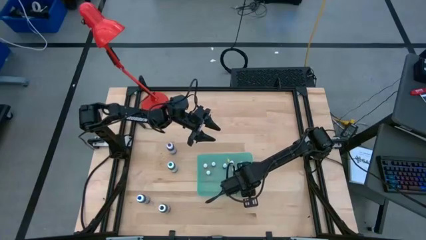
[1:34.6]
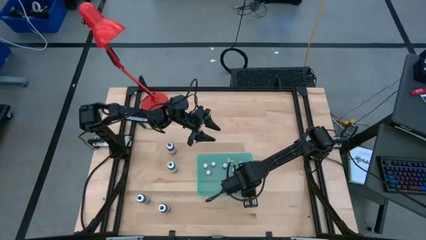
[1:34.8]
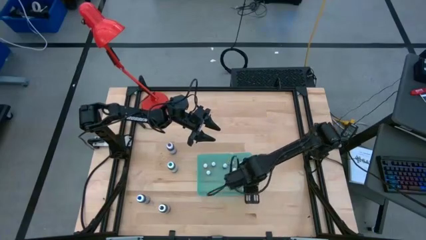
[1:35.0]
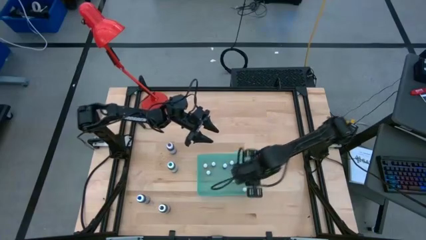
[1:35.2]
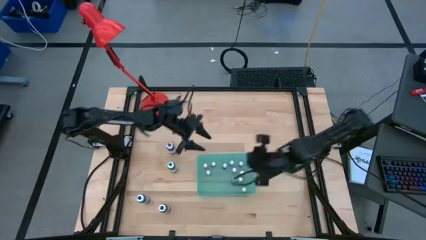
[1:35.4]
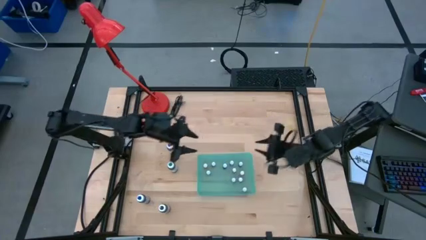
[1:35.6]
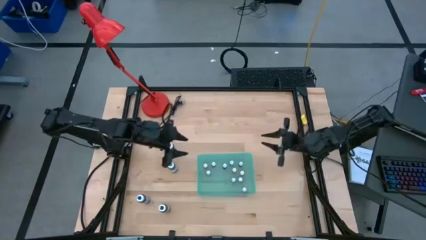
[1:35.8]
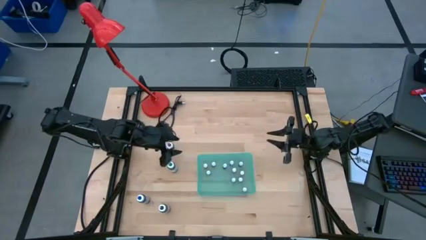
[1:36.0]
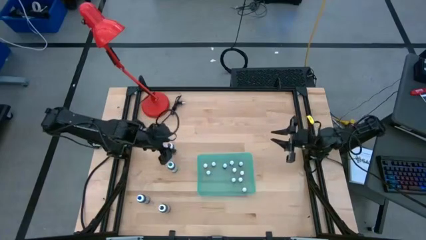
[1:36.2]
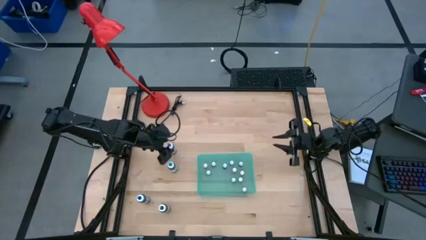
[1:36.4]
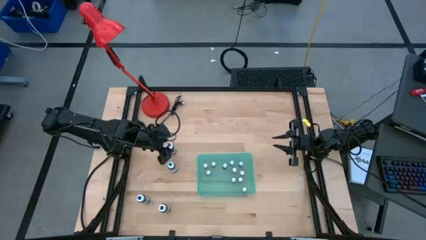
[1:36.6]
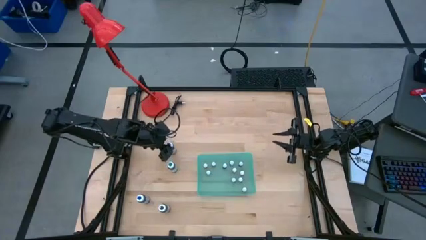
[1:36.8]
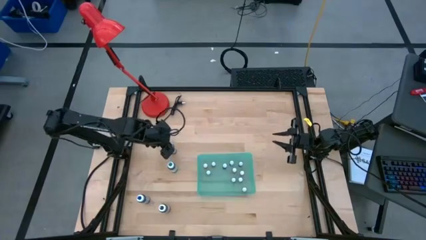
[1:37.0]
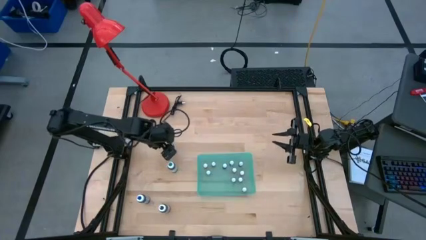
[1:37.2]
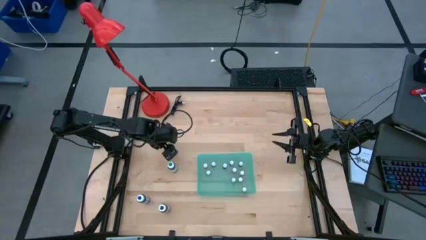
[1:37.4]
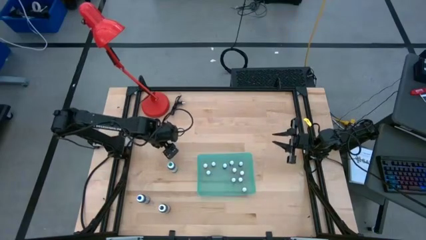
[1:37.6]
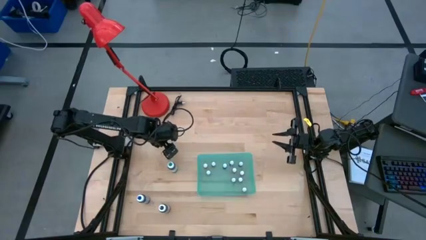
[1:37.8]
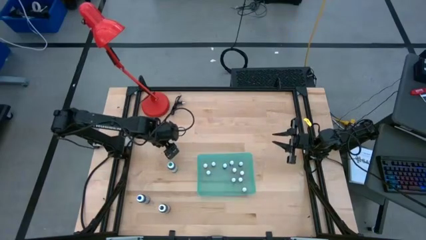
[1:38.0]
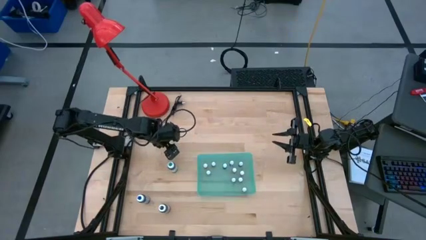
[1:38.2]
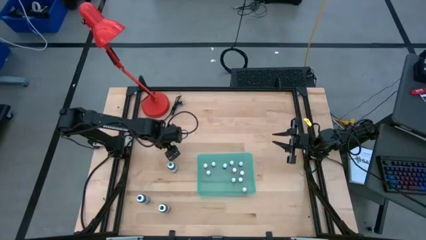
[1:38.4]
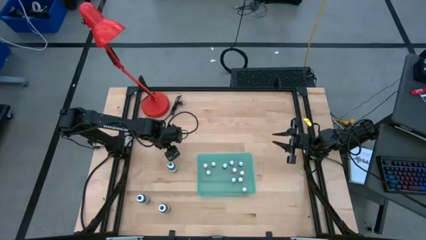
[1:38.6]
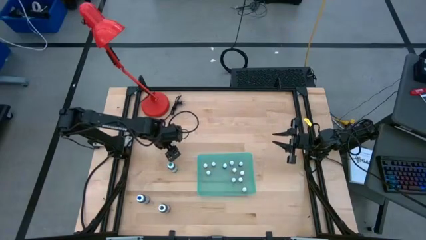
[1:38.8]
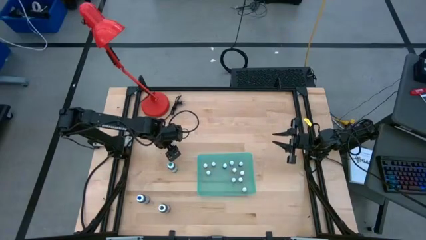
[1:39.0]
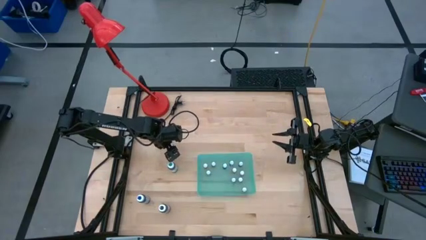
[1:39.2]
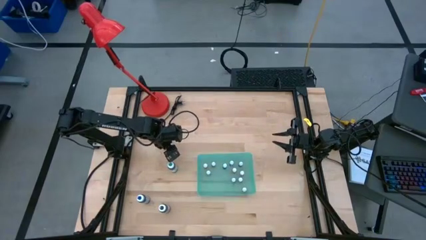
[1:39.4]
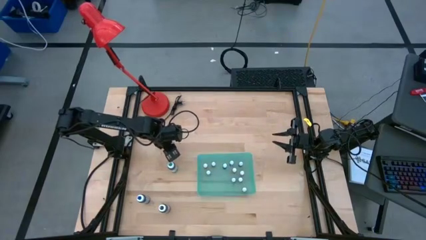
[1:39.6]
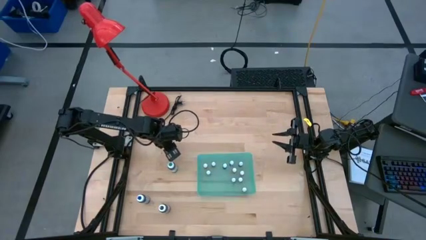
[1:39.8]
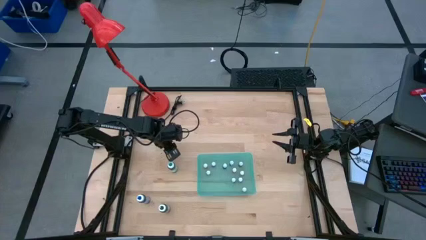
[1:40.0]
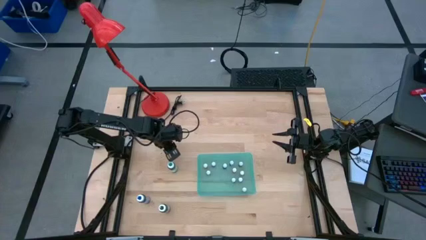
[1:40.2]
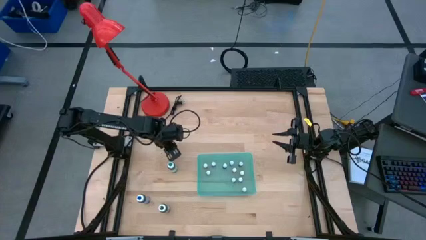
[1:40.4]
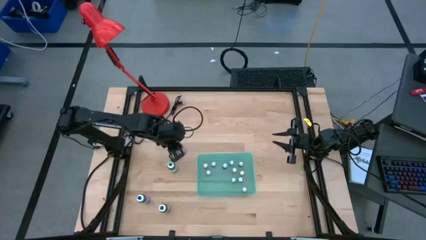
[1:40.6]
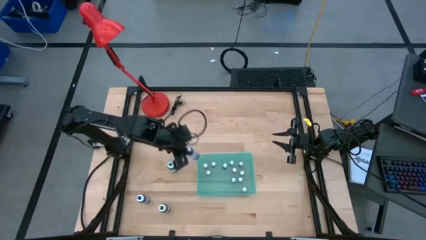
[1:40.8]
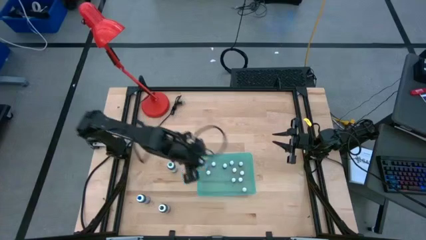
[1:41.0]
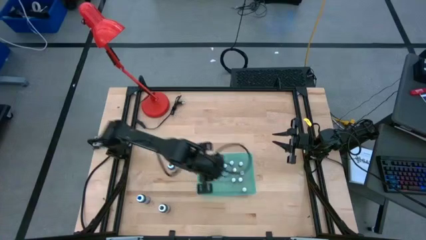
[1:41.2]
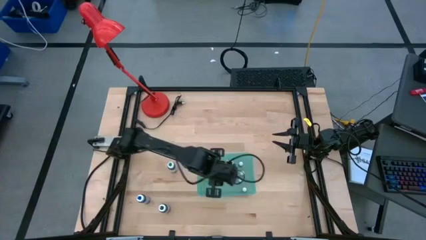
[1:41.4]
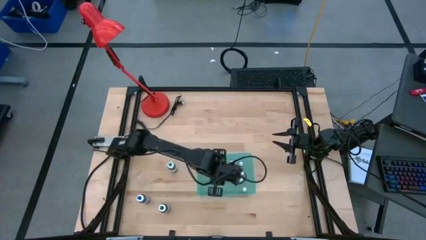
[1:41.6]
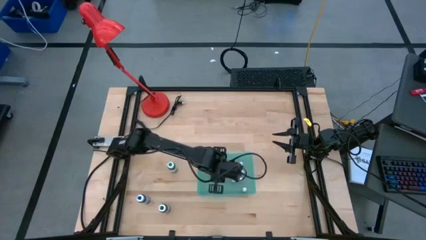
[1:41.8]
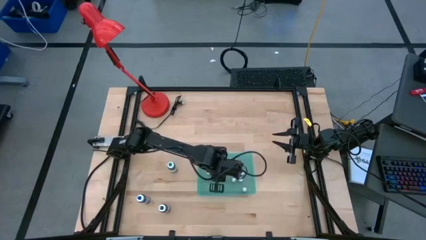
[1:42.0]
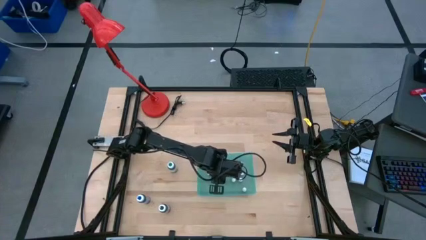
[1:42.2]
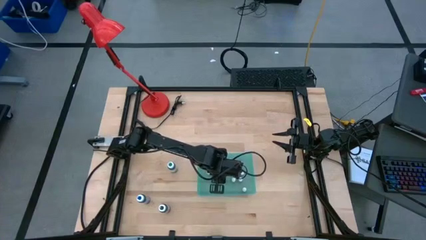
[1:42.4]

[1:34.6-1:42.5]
Task: Pick & Place food coloring
Put the large purple food coloring bottle into the green bin

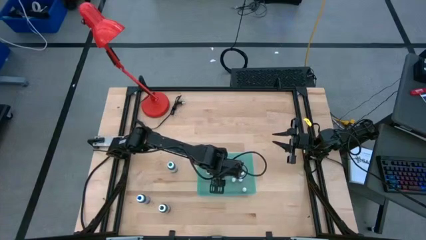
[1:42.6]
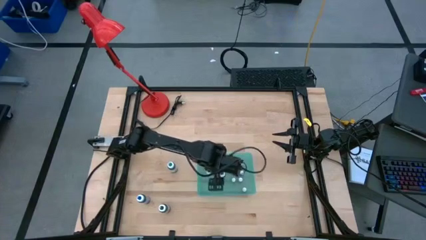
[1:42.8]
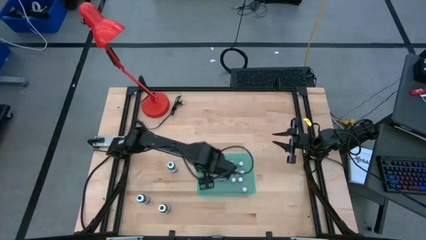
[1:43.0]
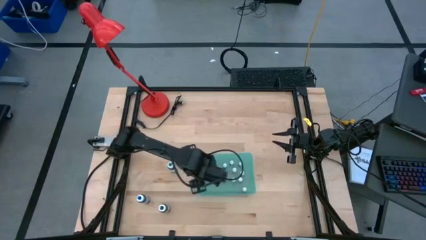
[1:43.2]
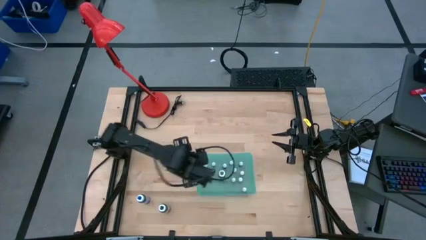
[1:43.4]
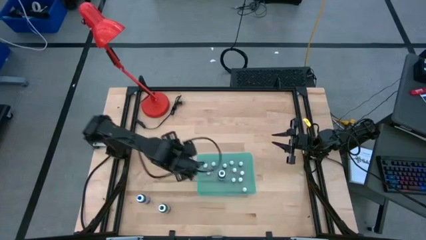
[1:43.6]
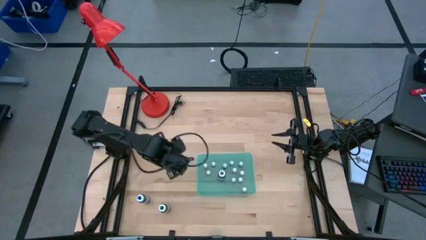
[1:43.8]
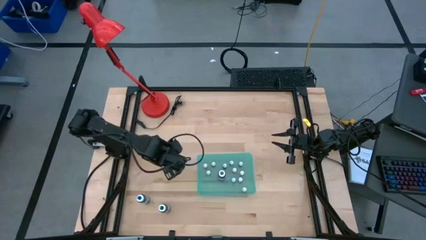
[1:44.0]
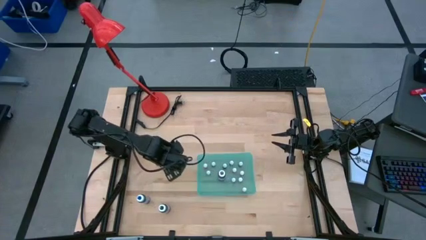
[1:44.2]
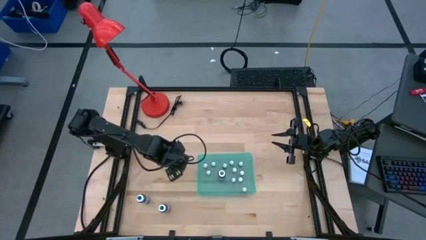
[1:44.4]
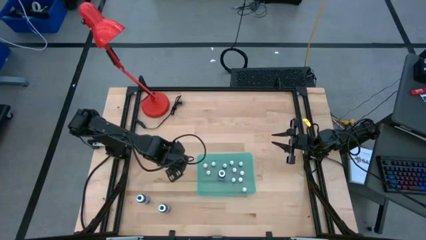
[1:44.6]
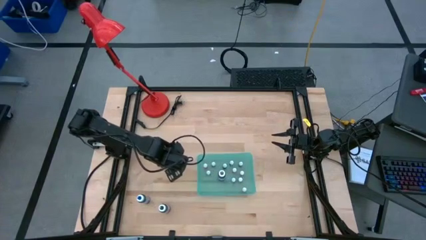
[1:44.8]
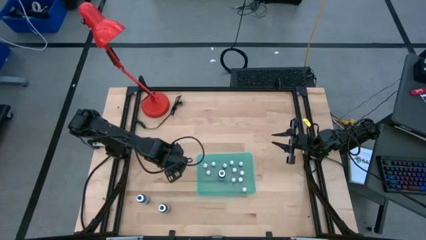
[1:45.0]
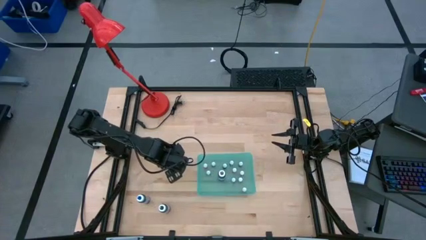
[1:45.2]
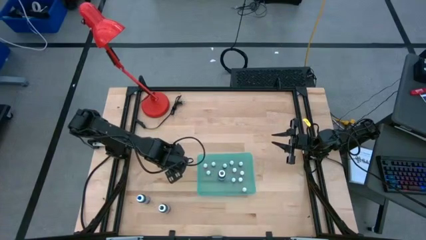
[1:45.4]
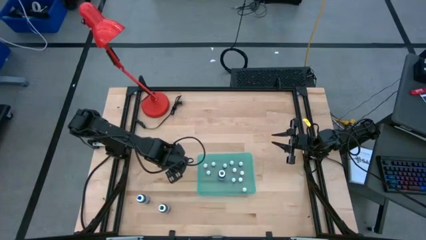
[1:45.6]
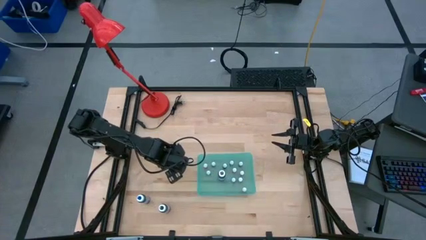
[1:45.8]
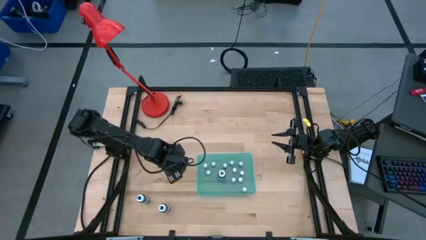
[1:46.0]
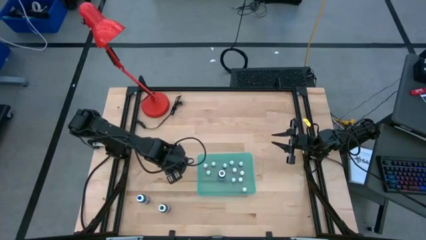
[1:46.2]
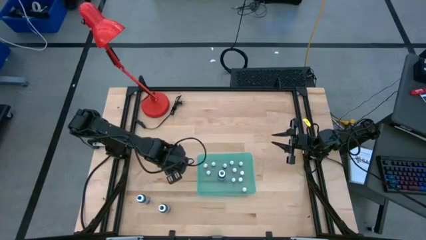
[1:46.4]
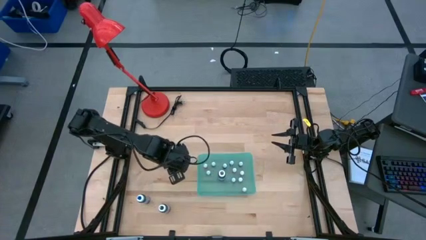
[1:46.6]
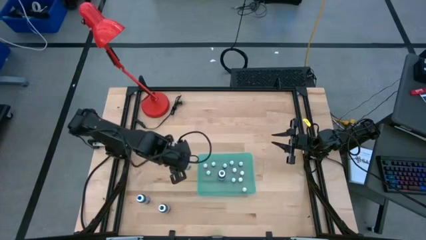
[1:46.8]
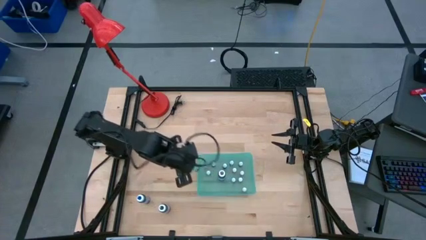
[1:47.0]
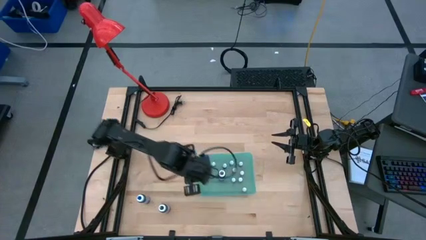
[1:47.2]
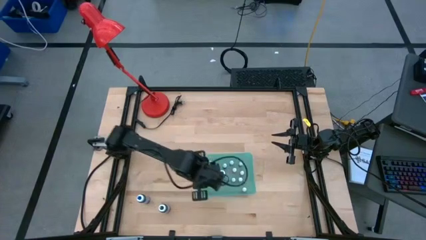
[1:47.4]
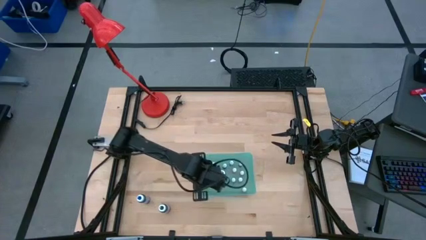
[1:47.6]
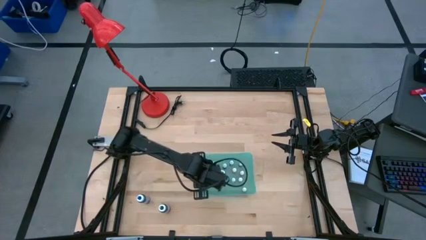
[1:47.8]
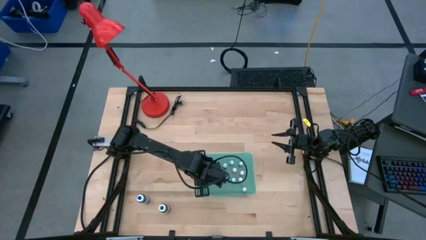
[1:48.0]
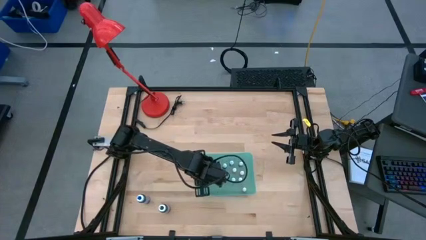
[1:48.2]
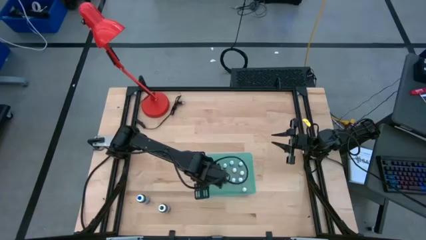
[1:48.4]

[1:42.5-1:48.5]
Put the large green food coloring bottle into the green bin
